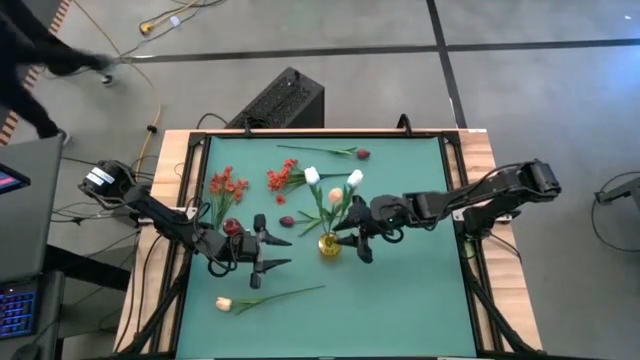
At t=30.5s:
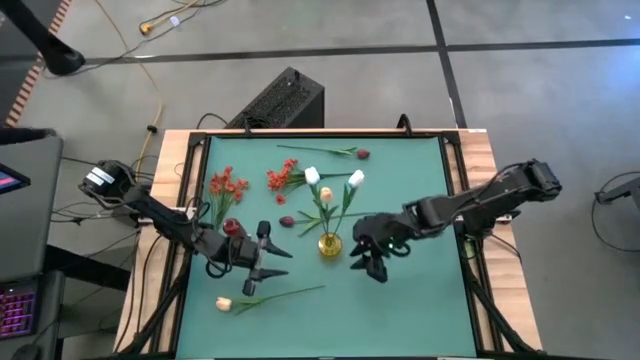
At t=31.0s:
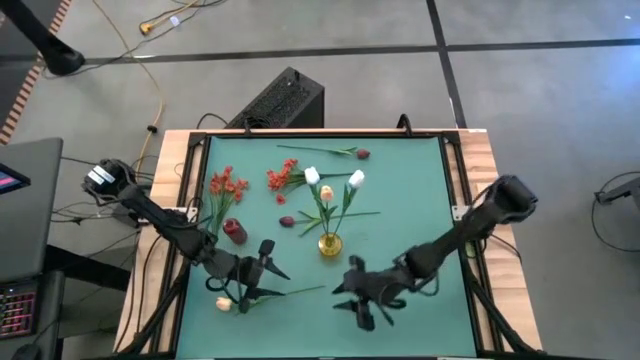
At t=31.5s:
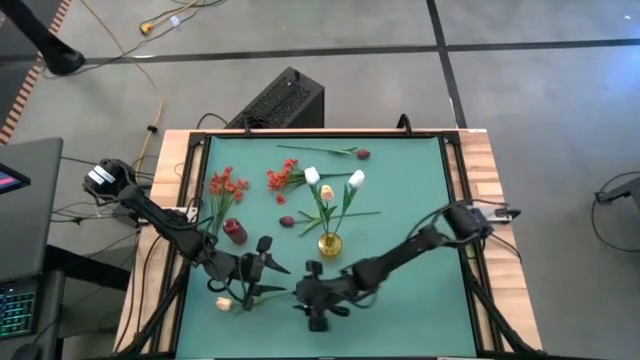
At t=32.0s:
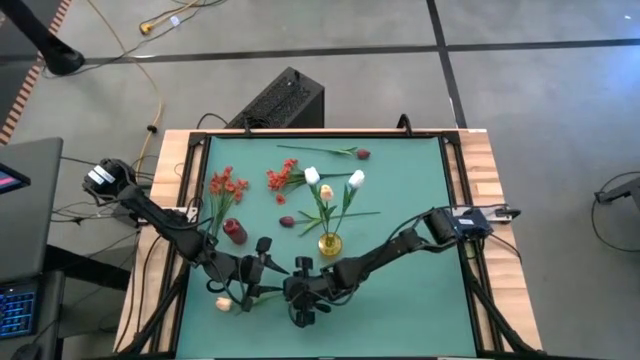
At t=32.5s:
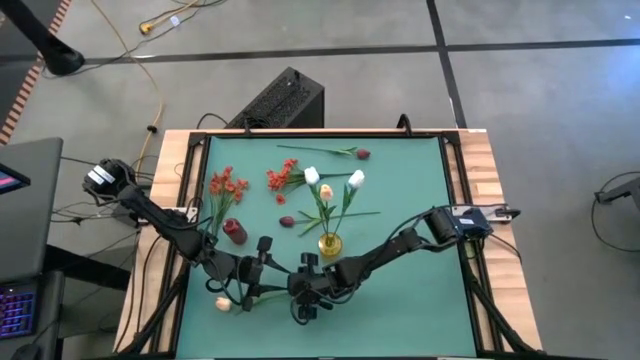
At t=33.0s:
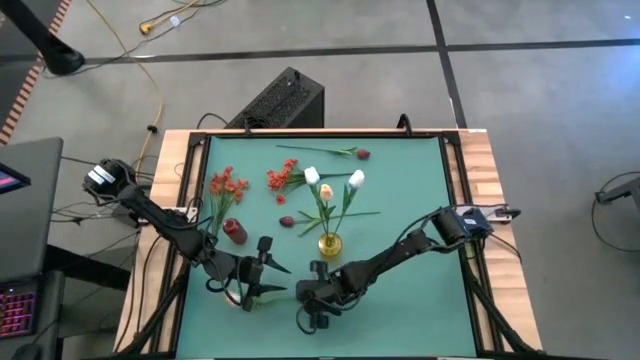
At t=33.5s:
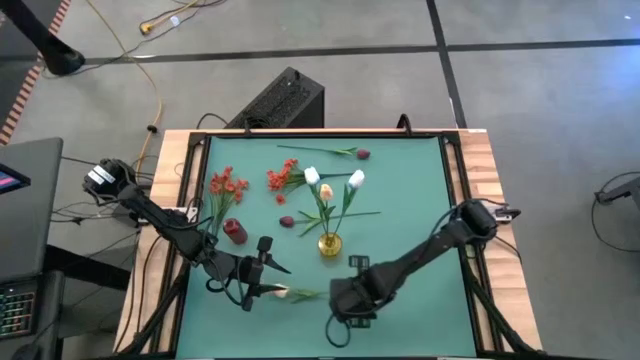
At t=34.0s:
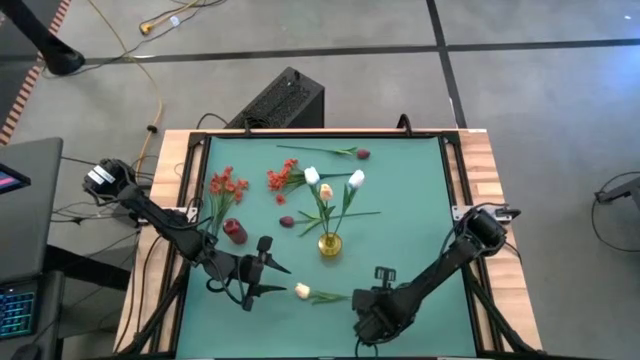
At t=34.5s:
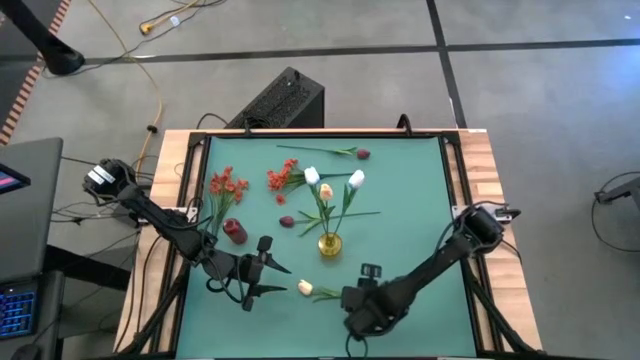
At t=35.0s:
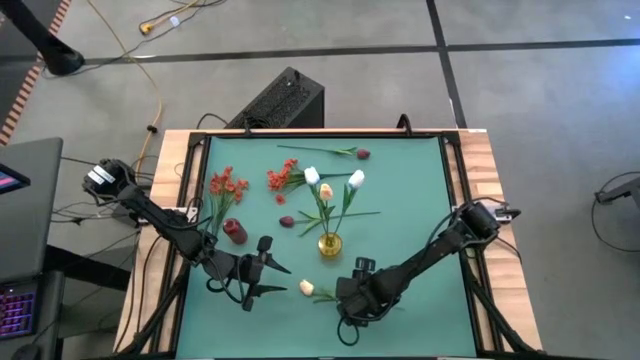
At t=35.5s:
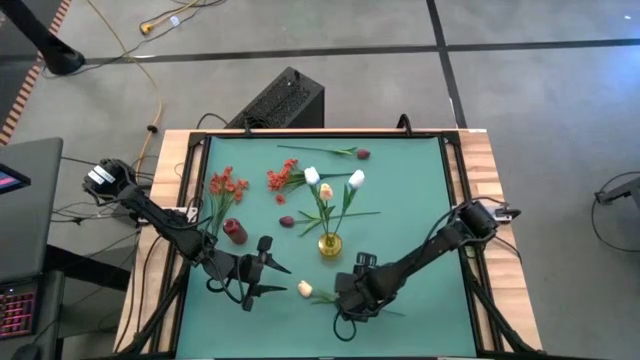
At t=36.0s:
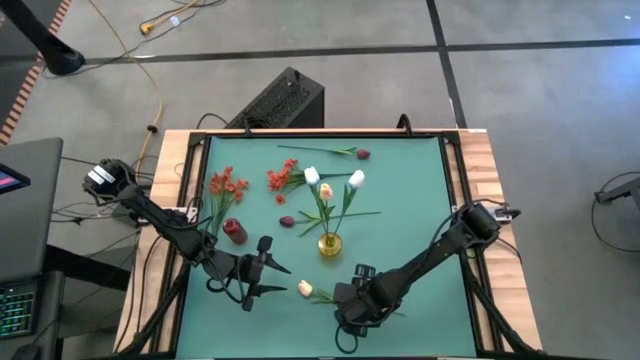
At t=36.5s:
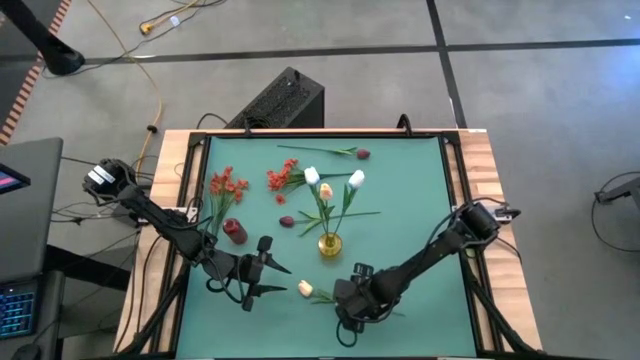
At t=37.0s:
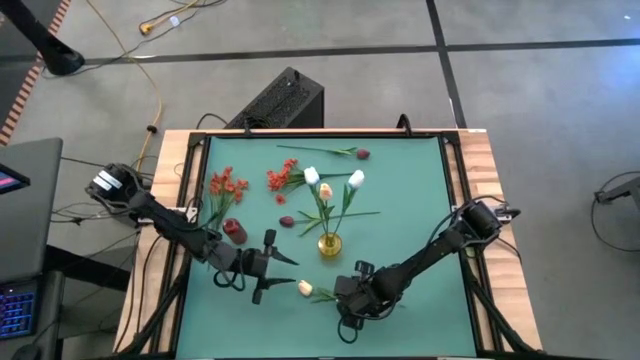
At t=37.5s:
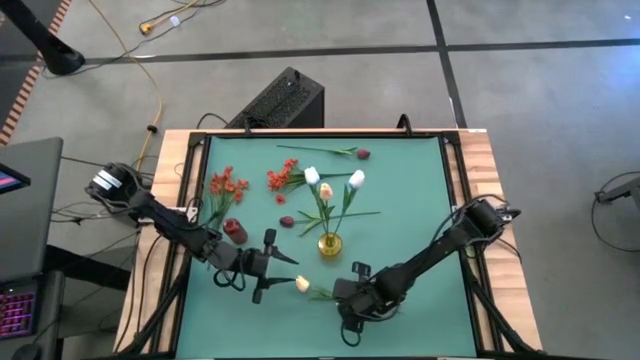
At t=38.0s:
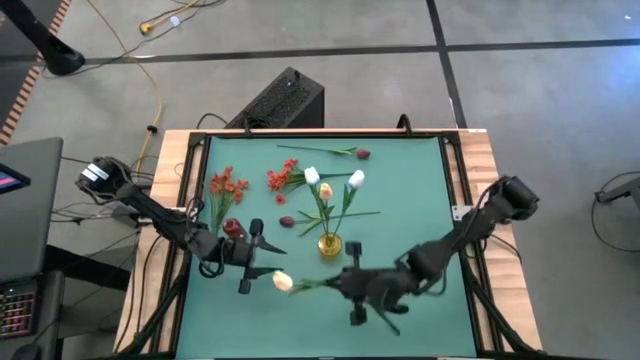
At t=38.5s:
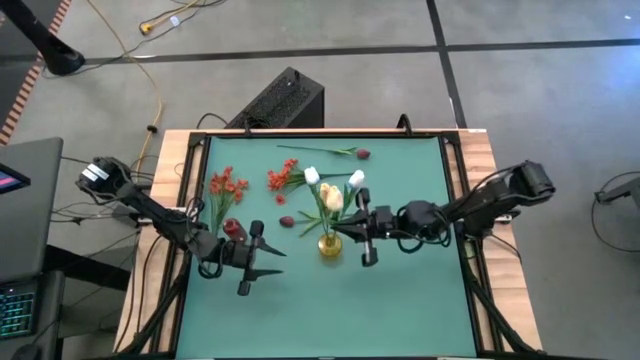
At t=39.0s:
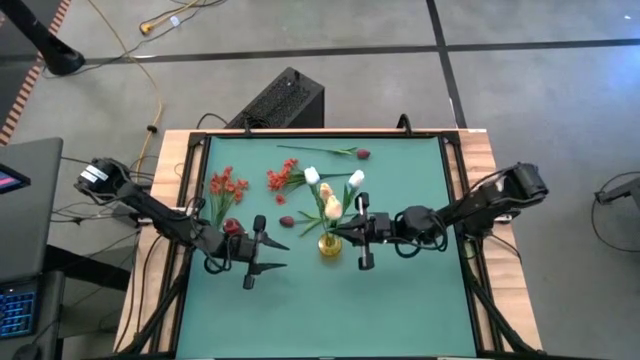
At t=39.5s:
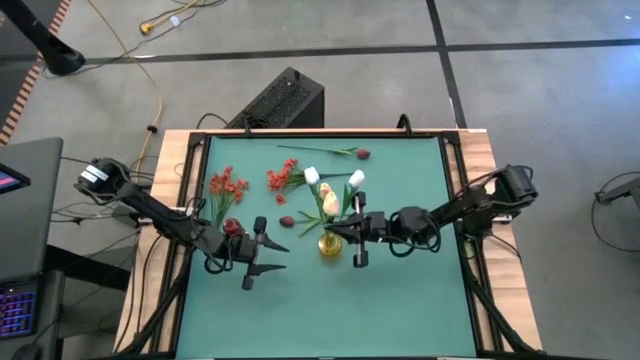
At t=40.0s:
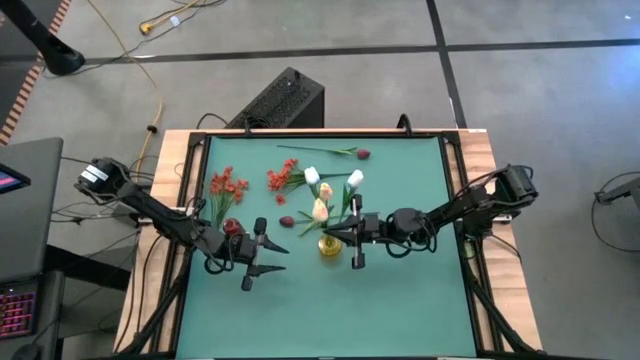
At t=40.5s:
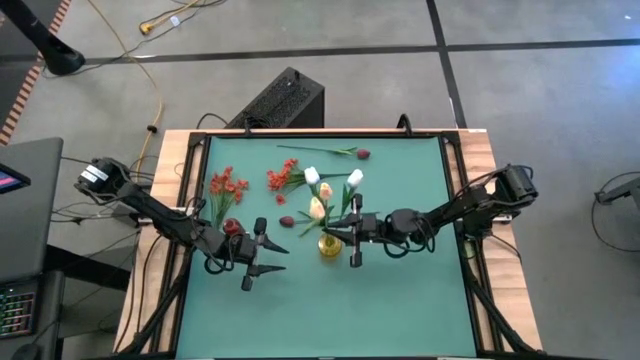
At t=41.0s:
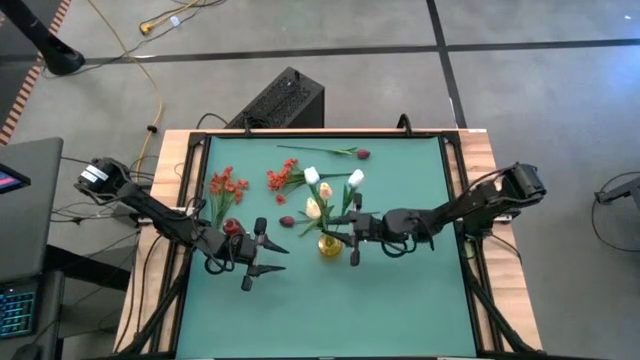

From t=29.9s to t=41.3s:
Task: Sort flowers into vase by color
Put the yellow flower into the yellow vase

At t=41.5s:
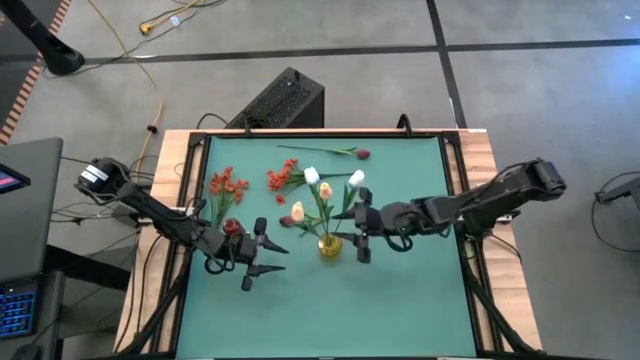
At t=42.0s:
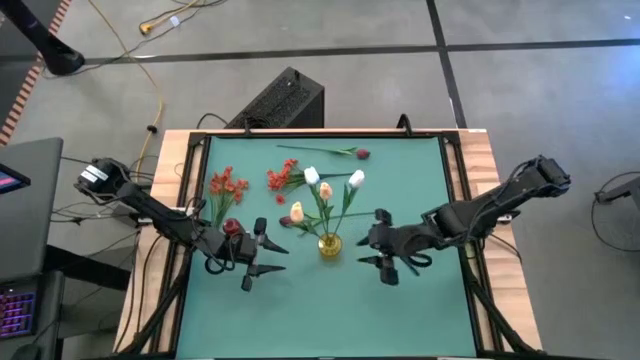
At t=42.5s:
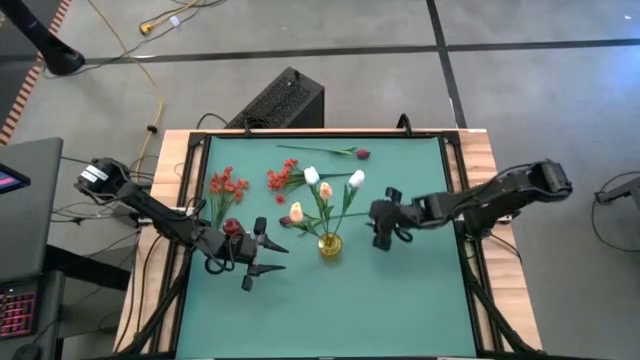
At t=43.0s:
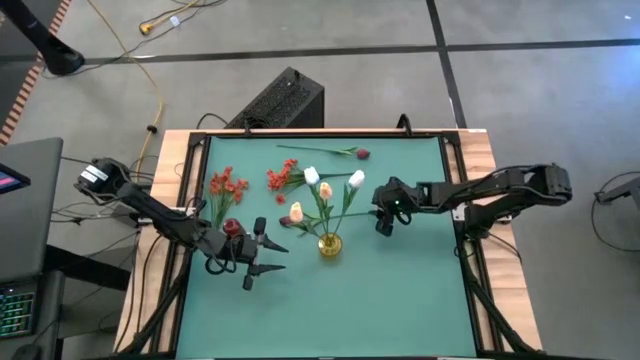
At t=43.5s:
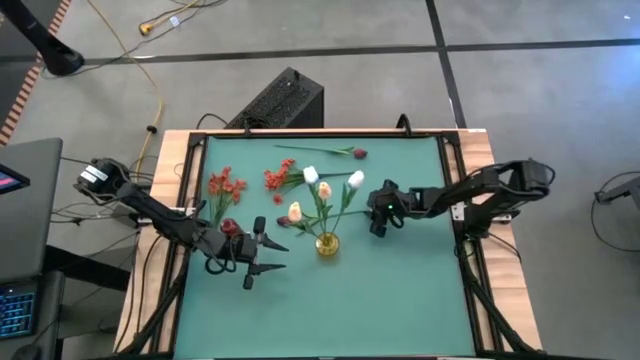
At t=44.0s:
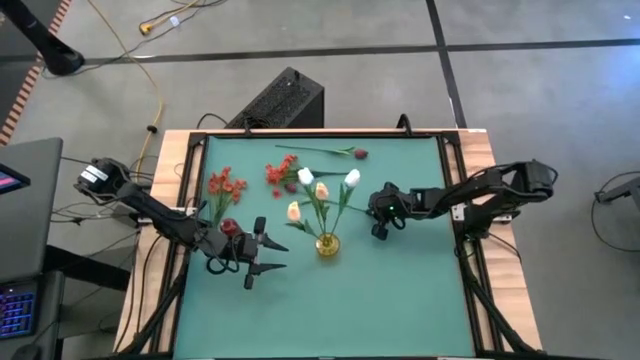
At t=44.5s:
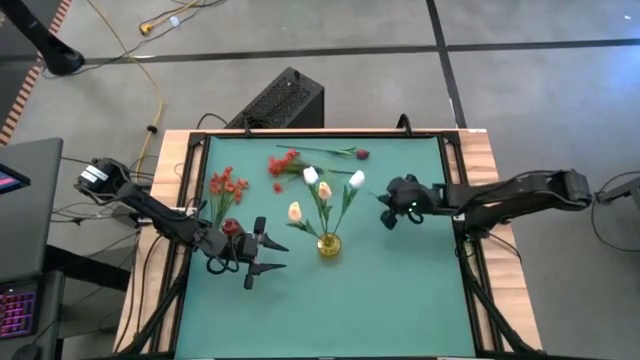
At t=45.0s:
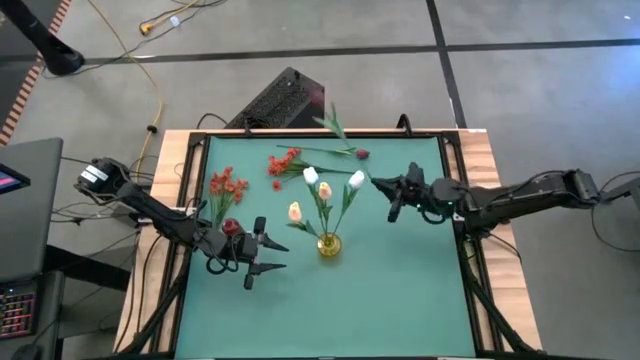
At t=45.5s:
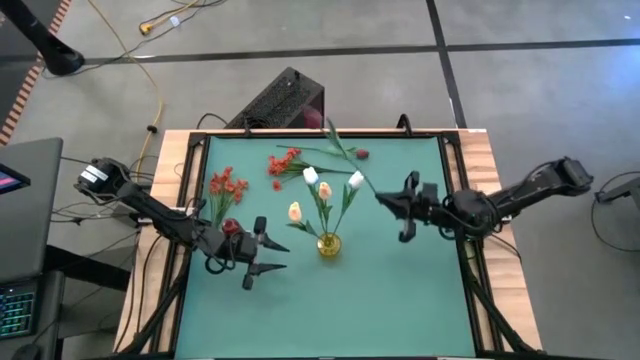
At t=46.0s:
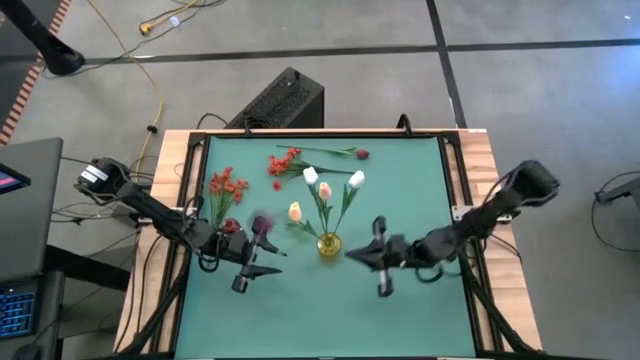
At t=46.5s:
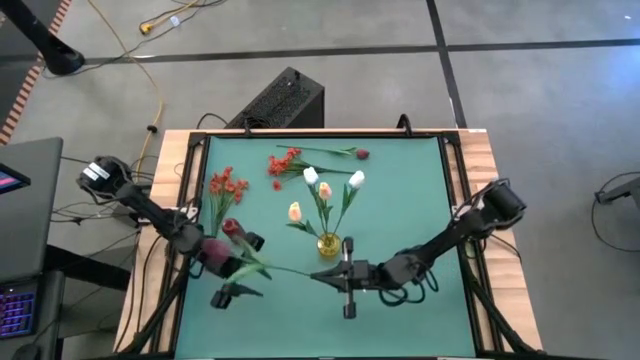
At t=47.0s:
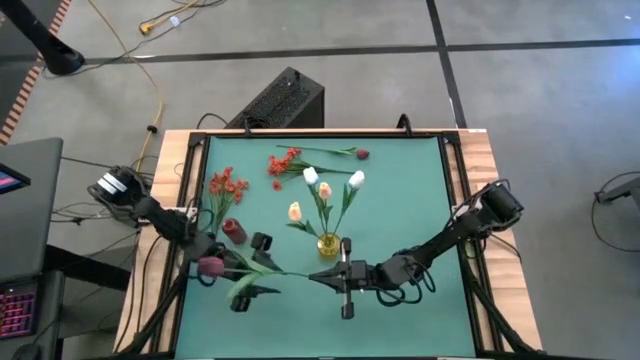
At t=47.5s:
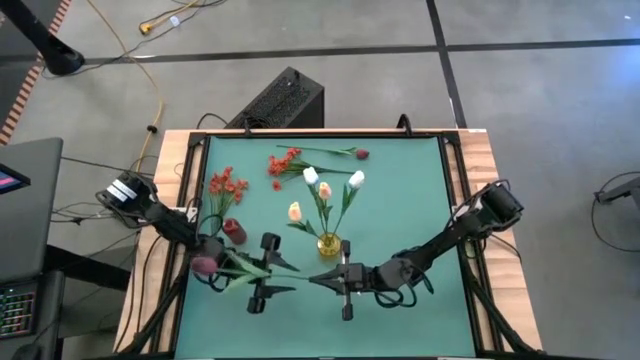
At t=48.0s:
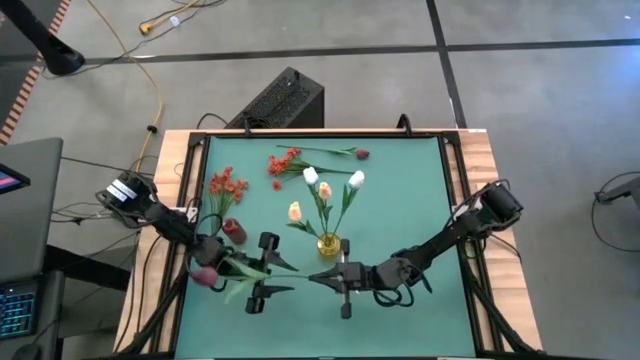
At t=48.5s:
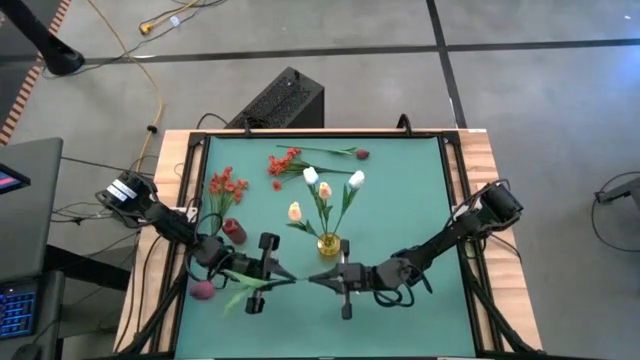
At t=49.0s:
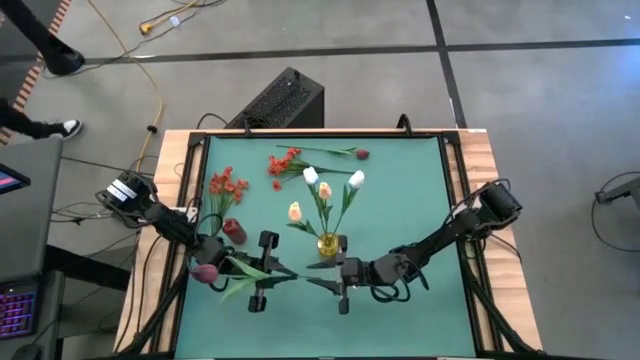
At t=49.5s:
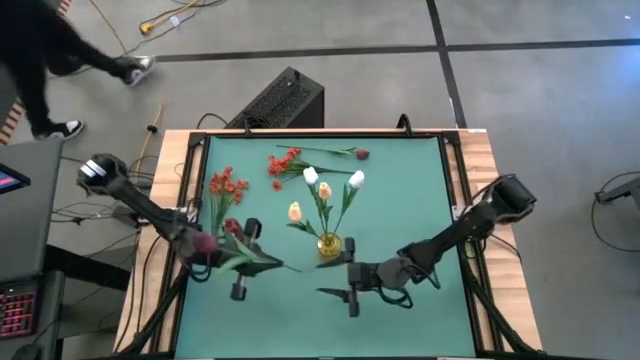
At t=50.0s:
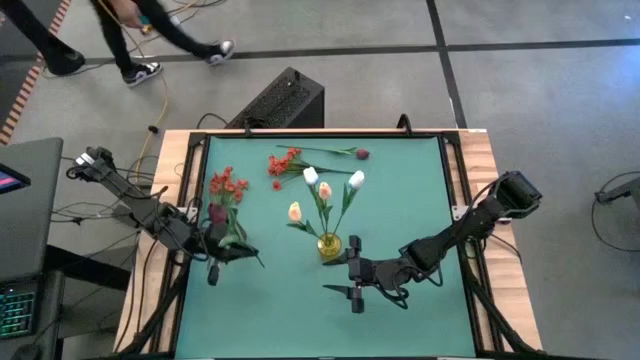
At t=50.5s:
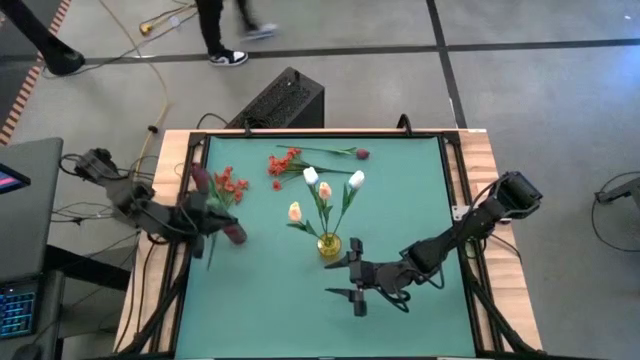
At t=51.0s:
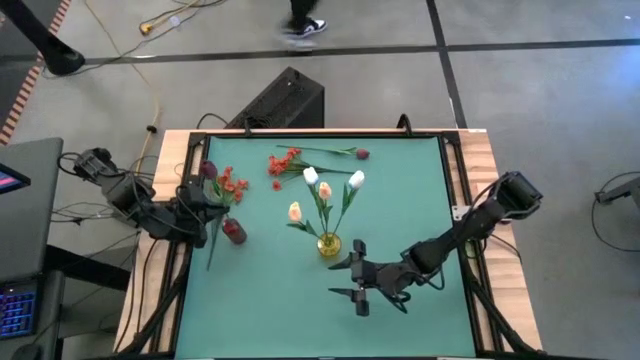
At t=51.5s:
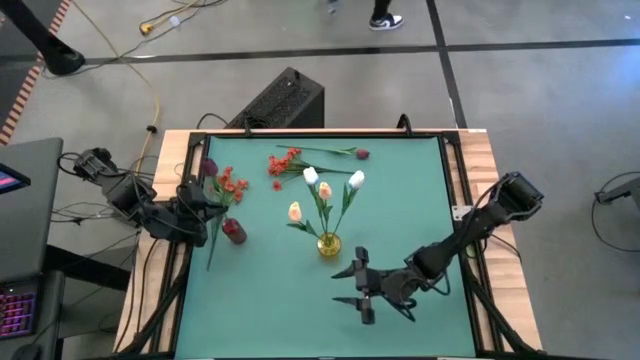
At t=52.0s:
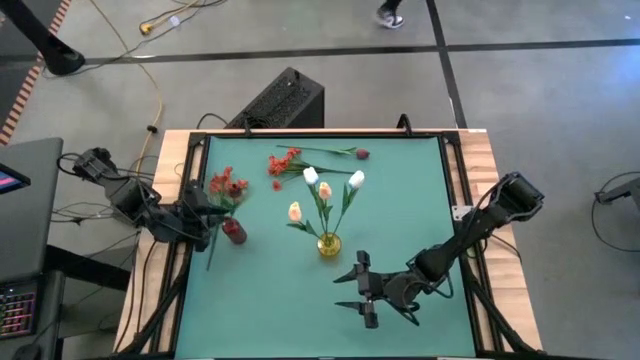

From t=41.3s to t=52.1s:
Put the bottom red flower into the red vase
